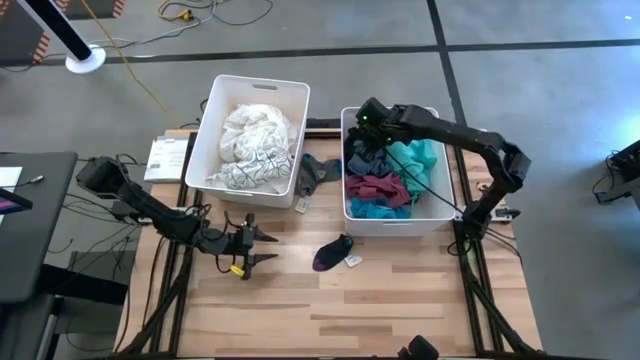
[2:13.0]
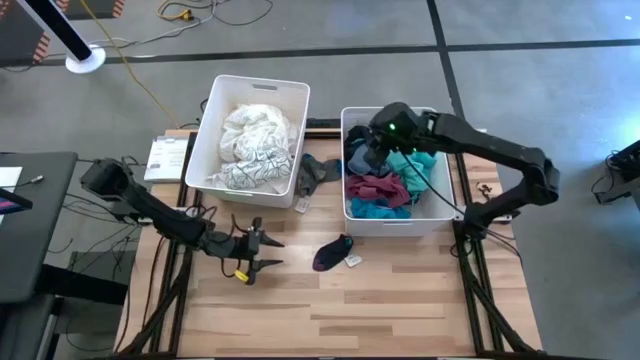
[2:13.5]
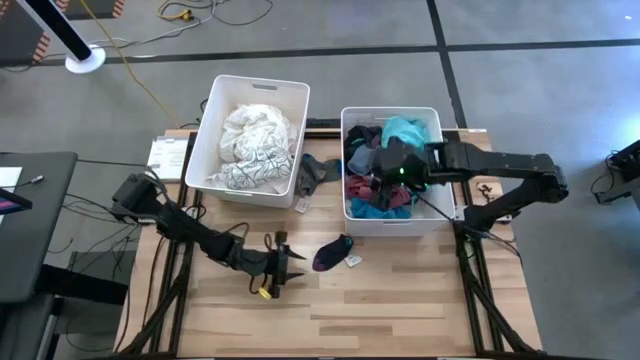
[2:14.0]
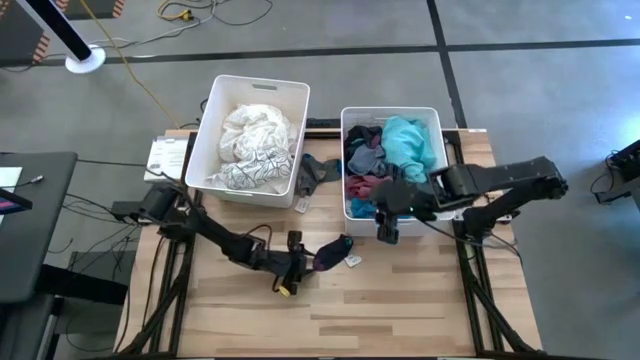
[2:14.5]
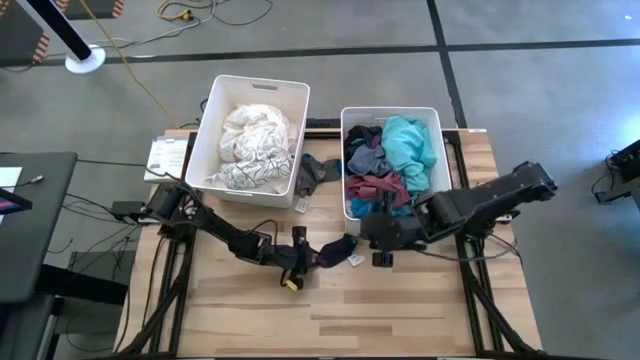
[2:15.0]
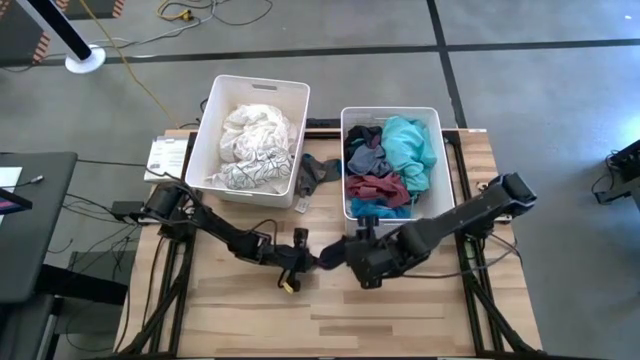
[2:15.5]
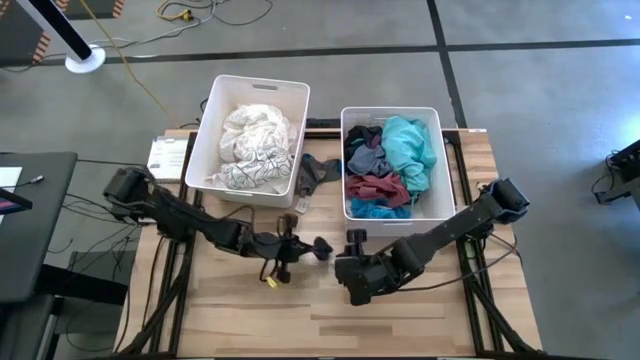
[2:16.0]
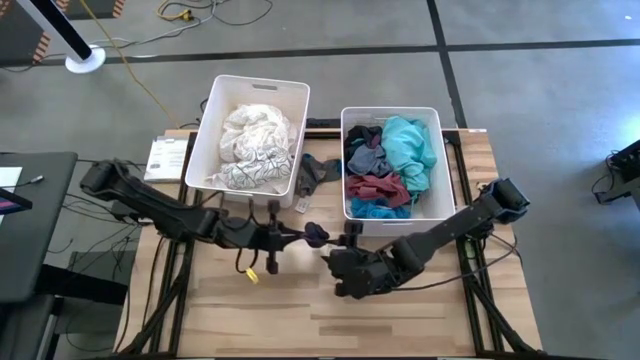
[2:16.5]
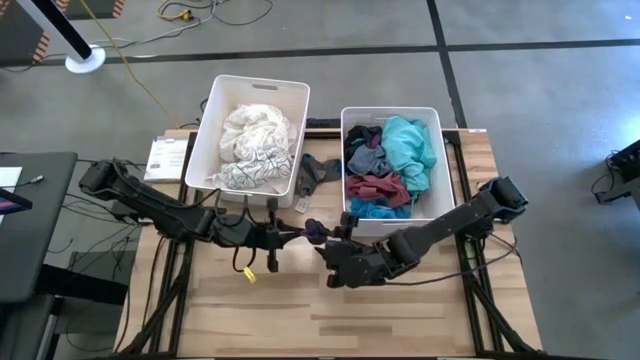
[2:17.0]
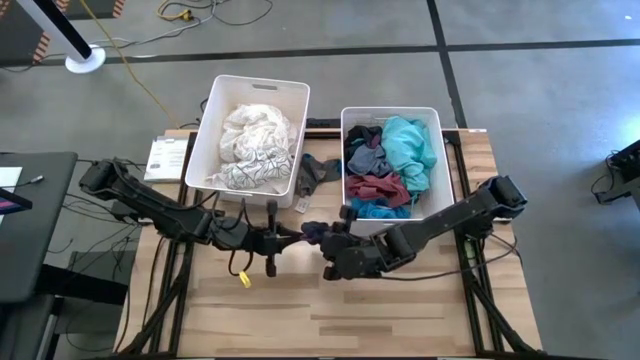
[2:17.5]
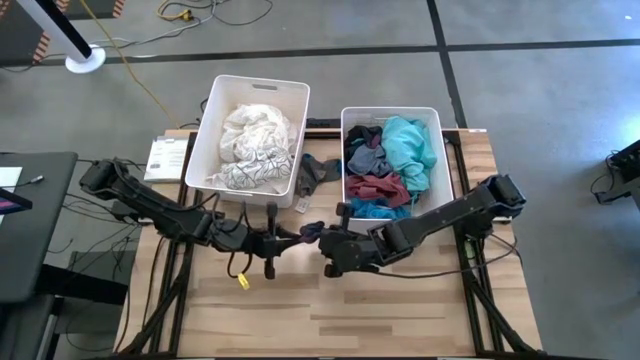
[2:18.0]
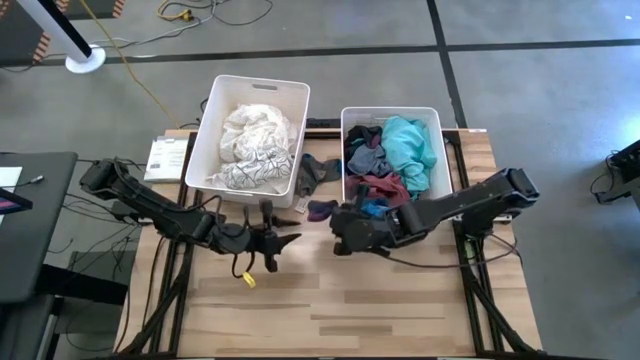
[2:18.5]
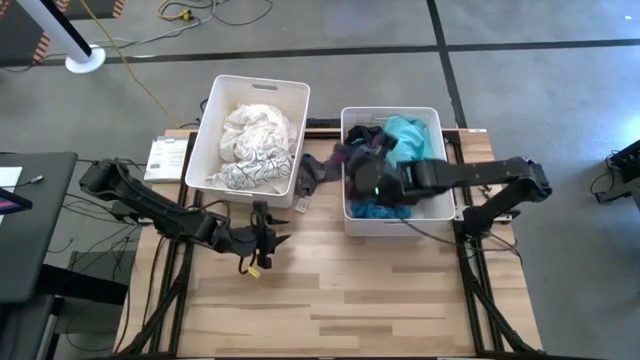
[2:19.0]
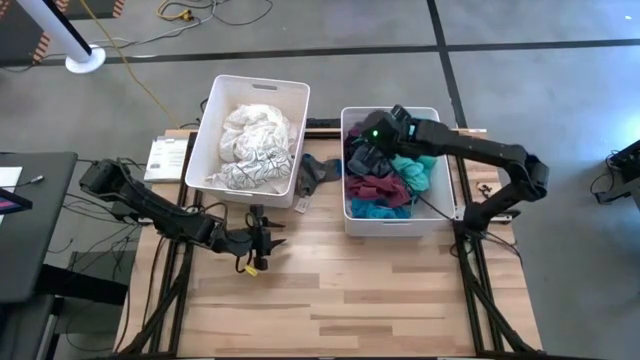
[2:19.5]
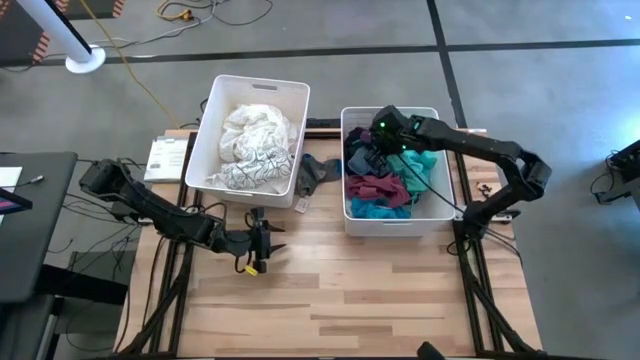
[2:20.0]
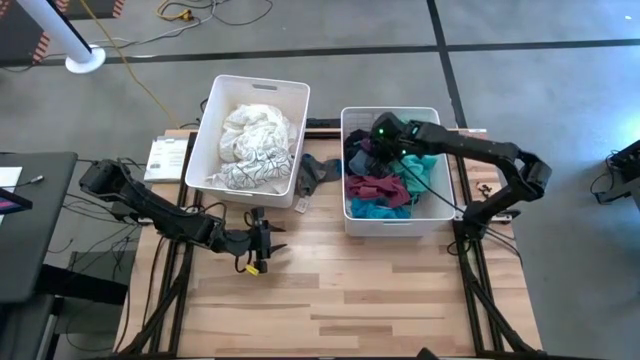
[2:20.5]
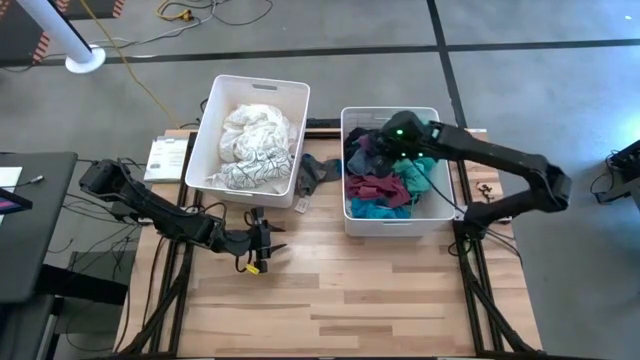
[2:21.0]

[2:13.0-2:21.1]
Task: Sort clothes
Put the dark blue sock into the right white laundry bin

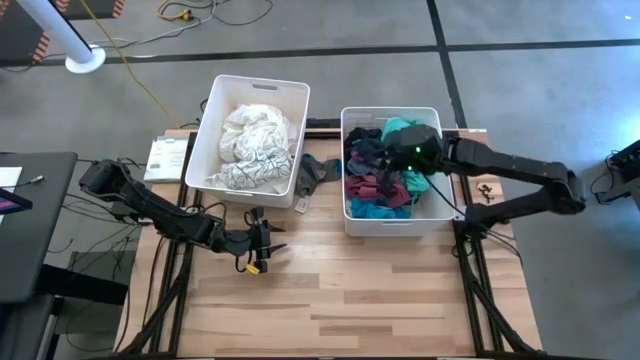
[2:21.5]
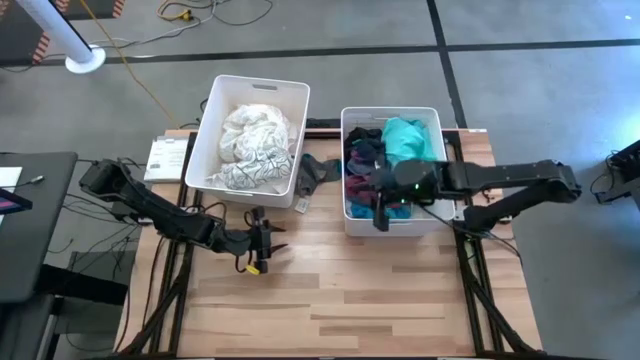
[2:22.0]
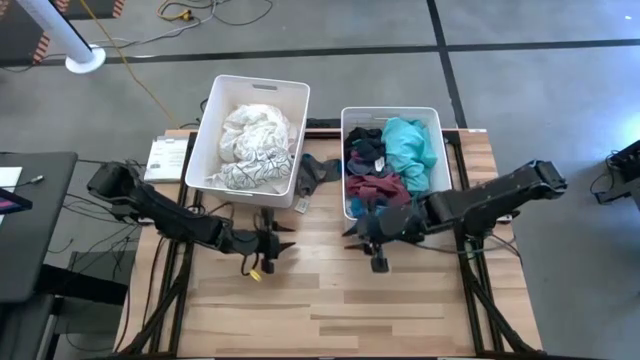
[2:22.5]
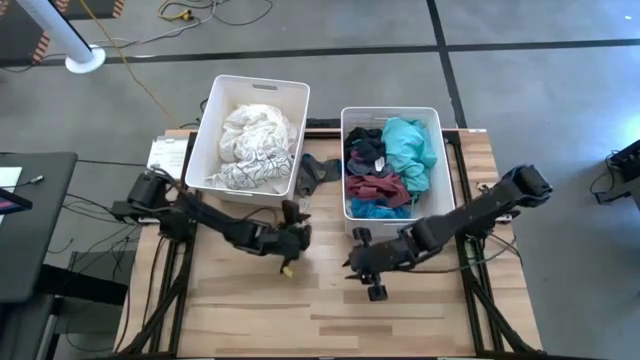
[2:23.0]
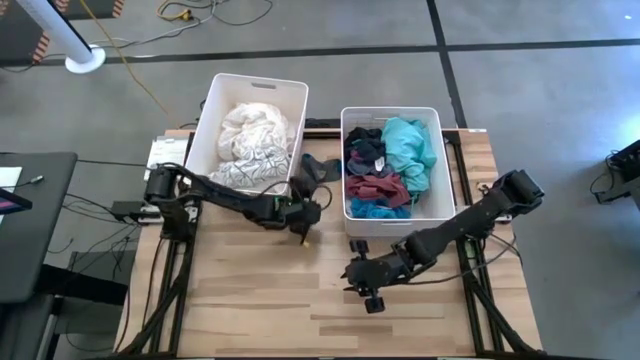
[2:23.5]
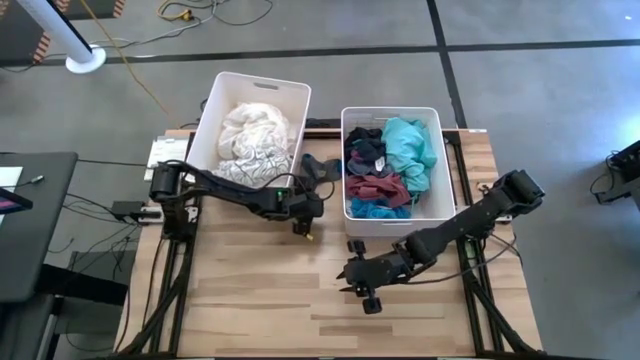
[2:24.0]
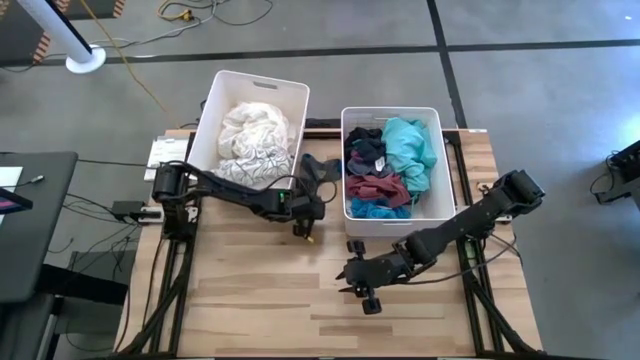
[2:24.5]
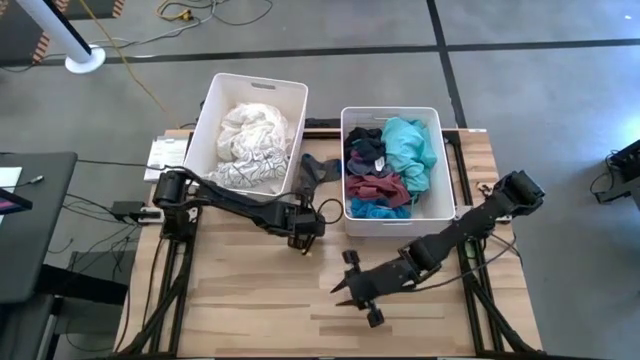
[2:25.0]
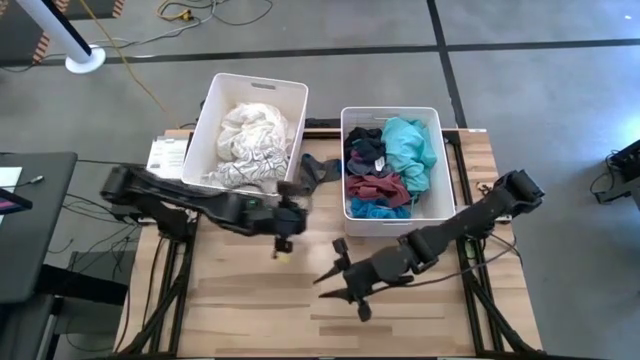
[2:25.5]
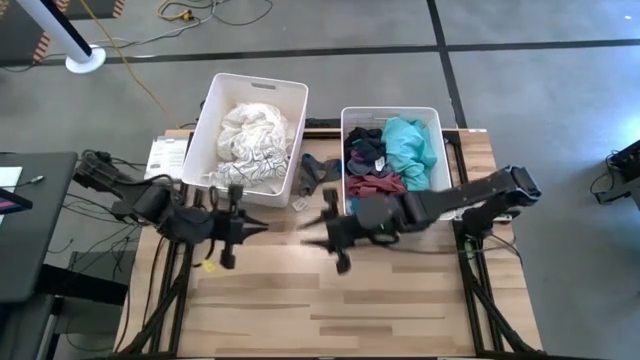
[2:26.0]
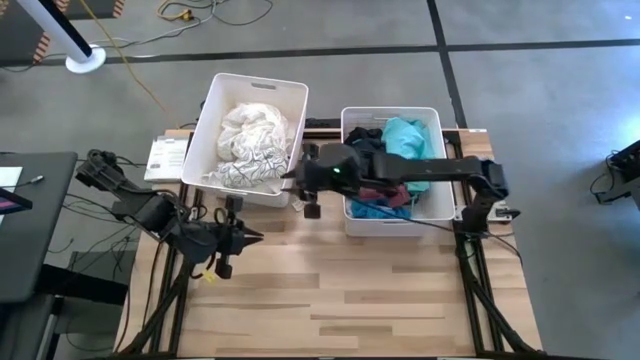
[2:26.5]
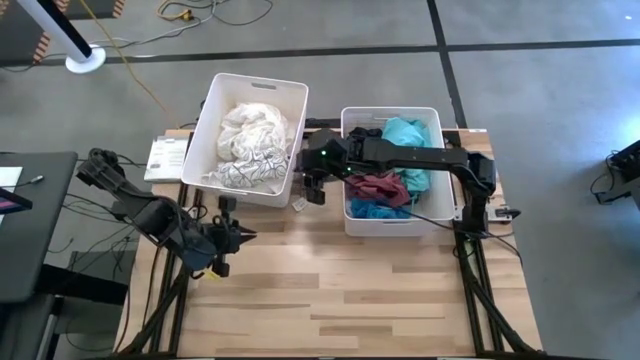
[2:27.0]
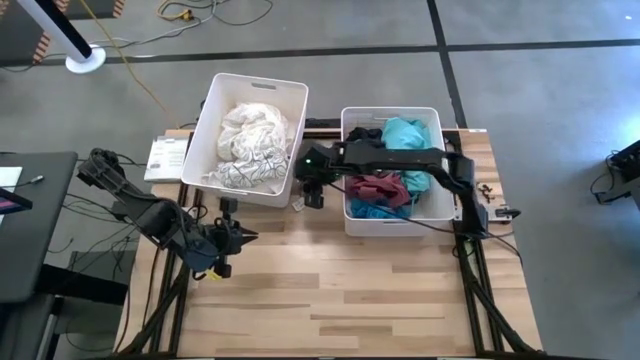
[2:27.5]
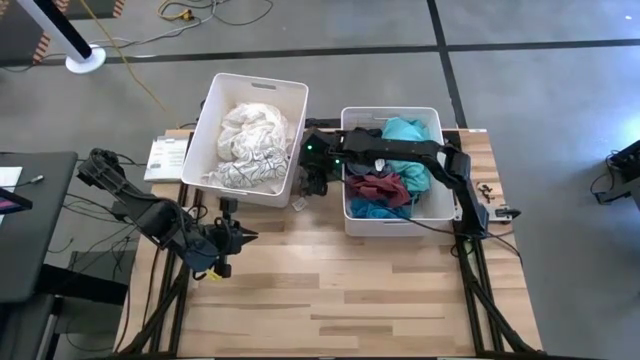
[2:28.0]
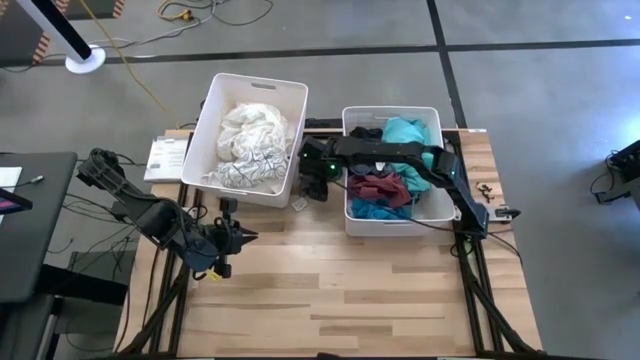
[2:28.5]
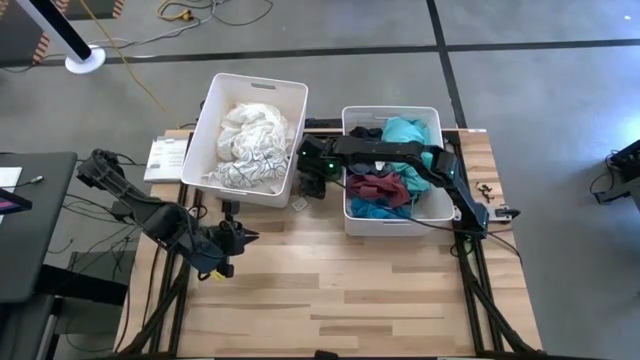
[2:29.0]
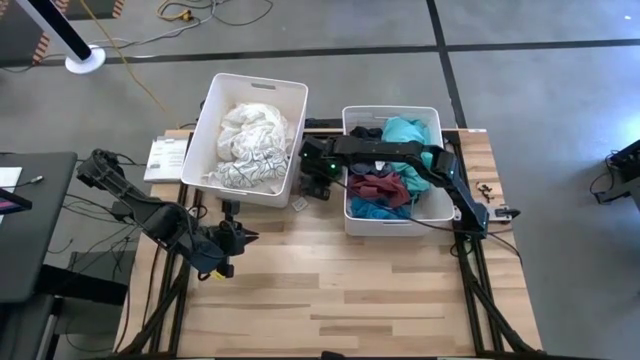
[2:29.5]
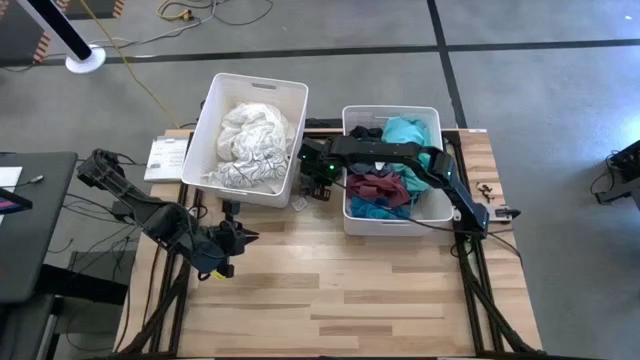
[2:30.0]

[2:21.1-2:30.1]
Move the bottom gray sock to the center of the table

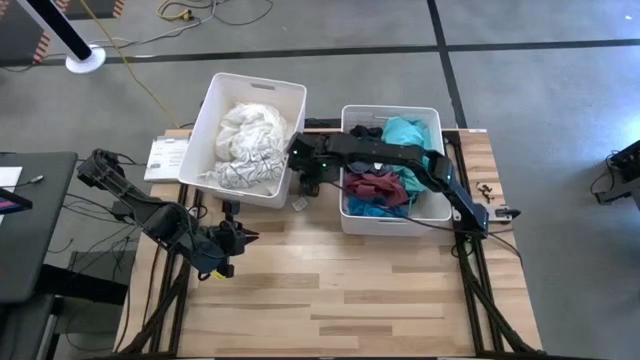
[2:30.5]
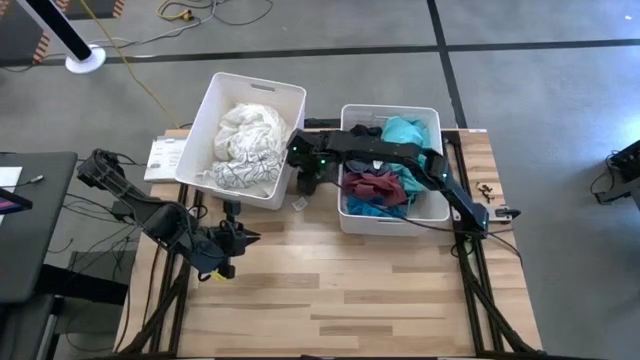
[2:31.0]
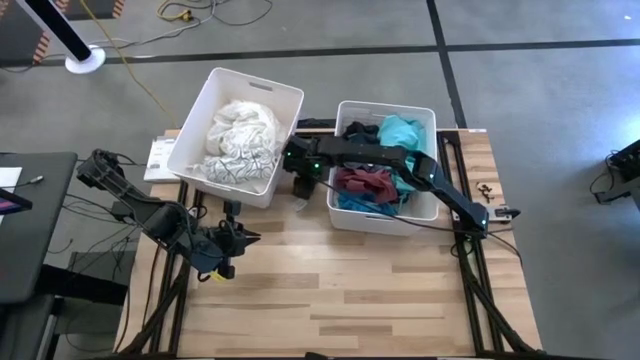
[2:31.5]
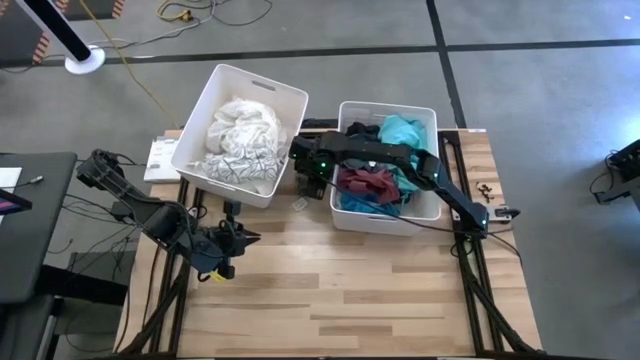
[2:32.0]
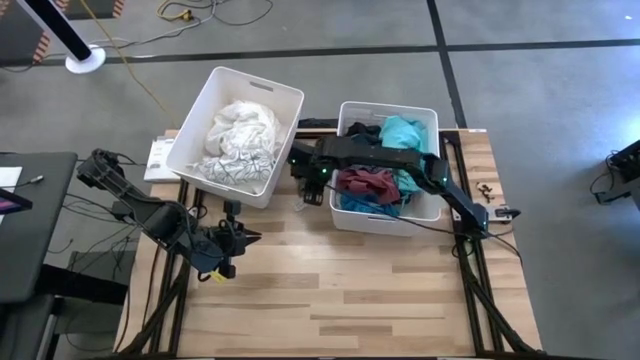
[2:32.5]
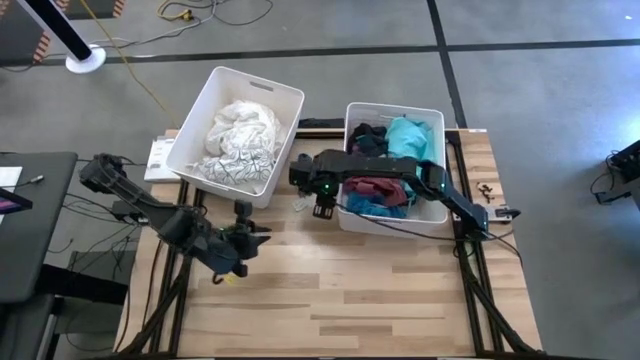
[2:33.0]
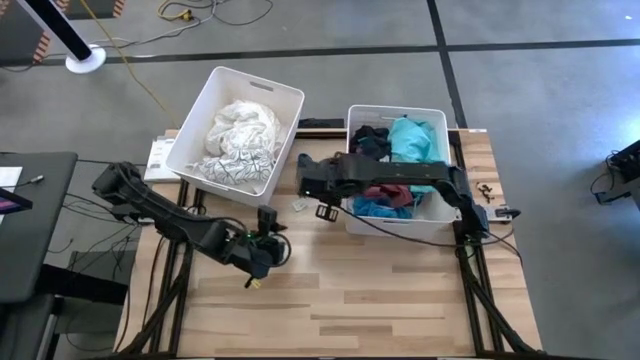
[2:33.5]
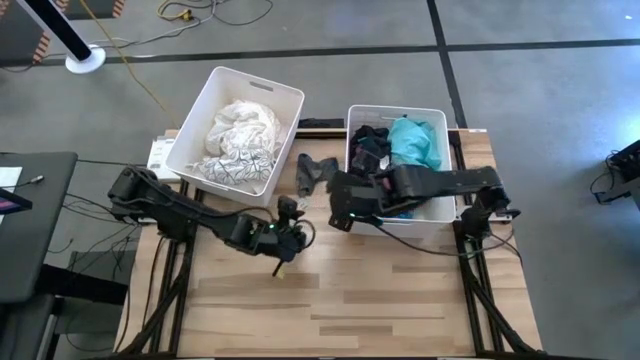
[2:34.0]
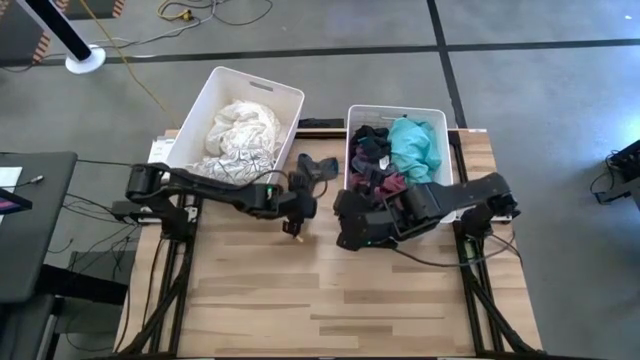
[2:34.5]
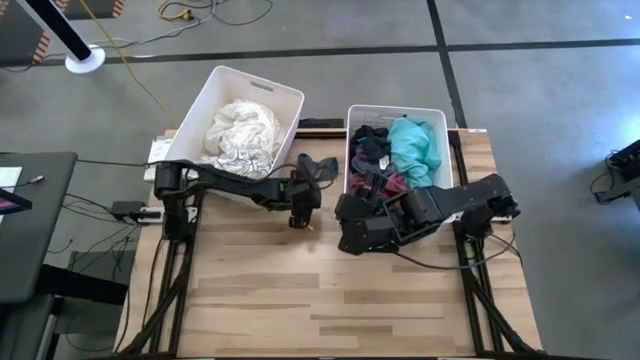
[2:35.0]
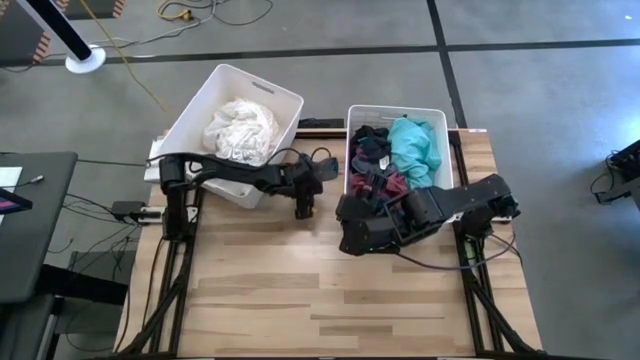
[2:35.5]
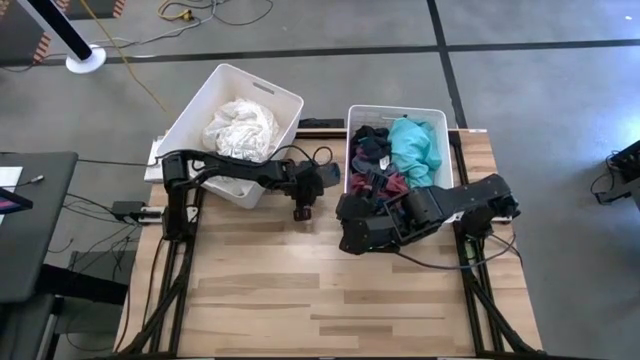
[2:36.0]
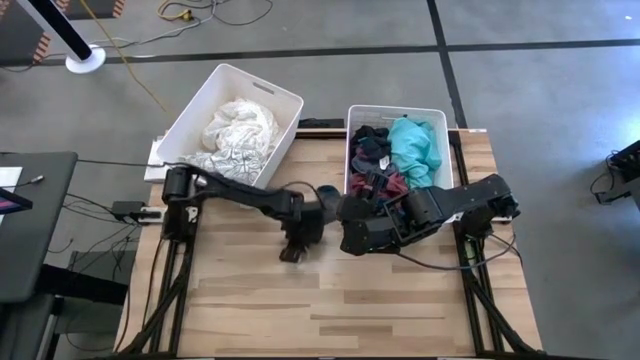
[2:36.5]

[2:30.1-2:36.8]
Move the bottom gray sock to the center of the table
